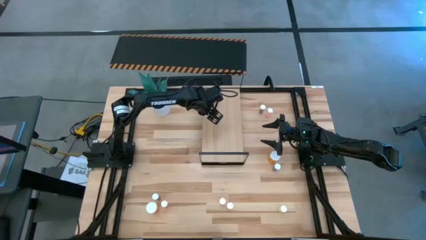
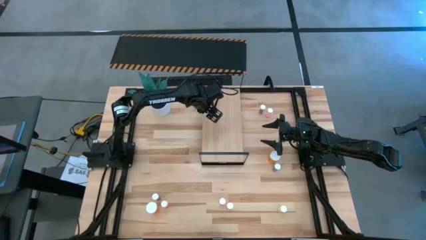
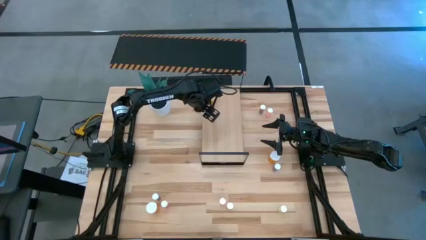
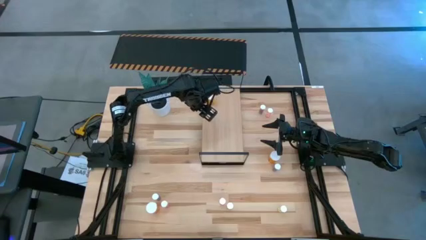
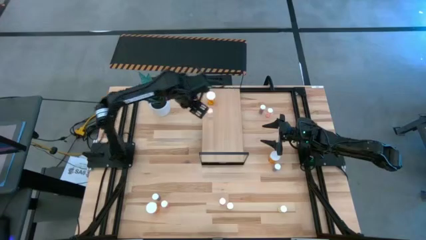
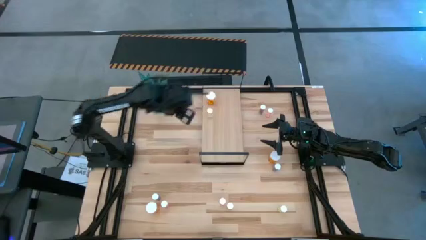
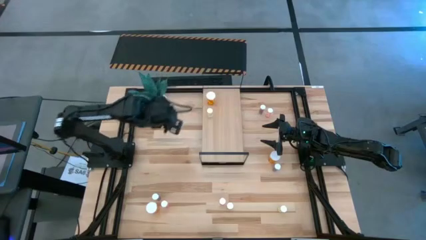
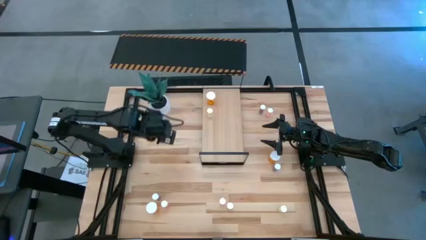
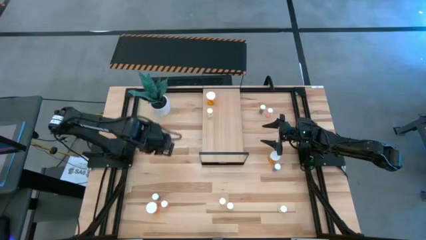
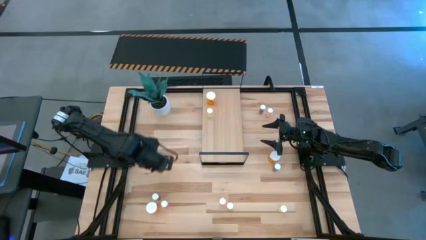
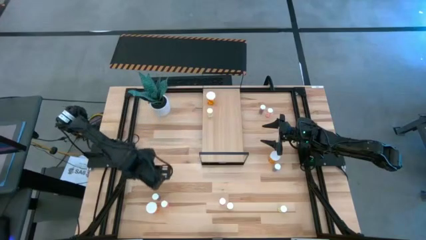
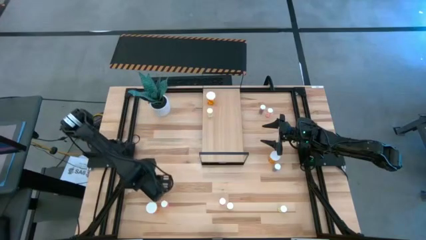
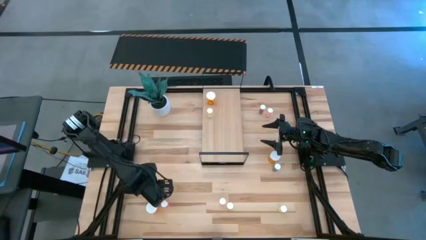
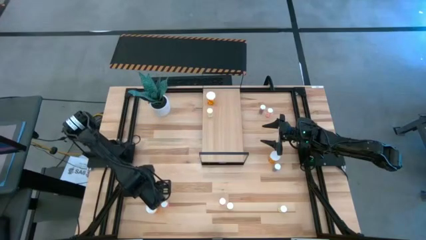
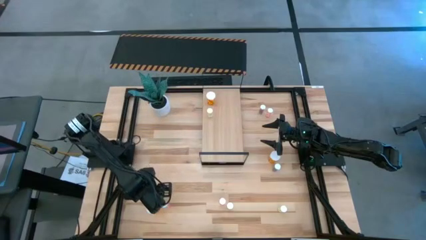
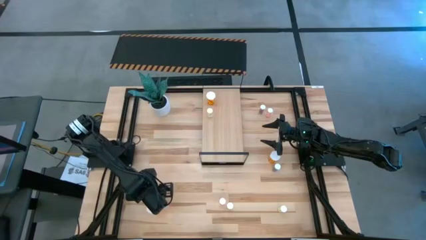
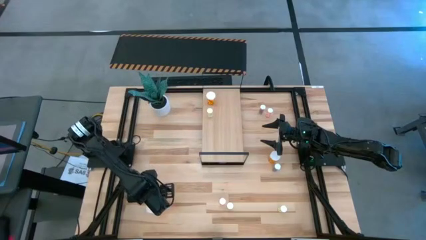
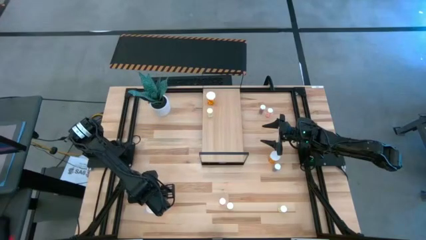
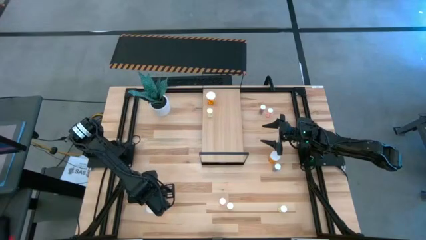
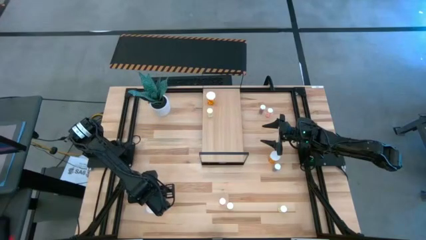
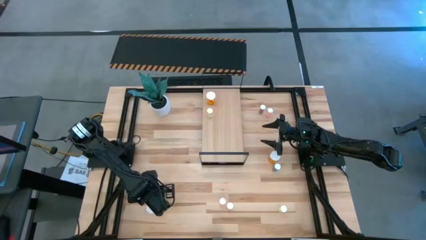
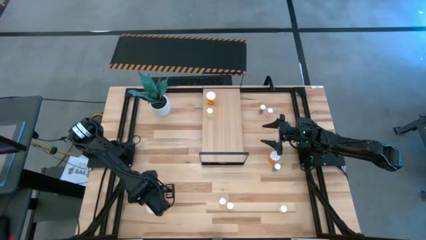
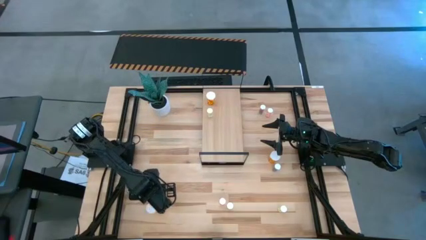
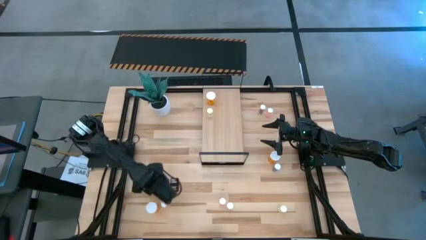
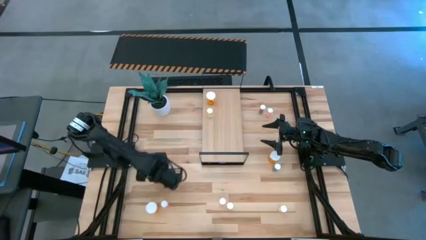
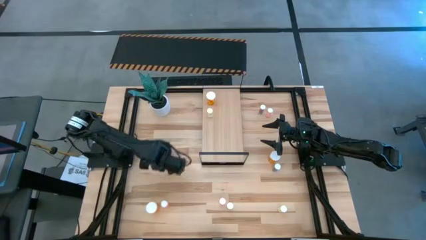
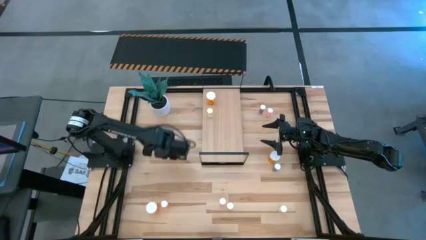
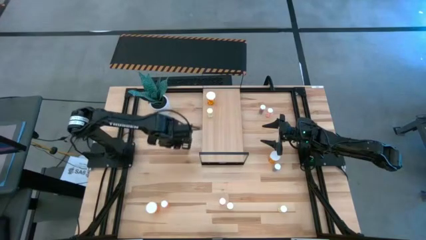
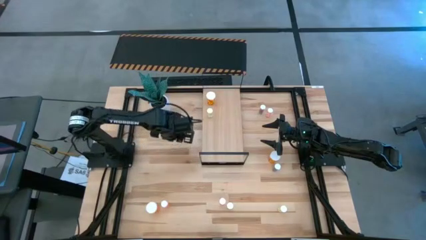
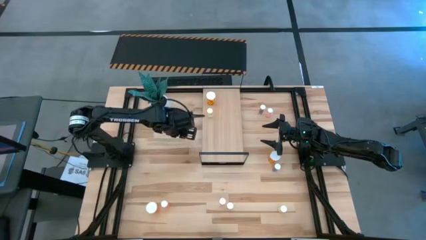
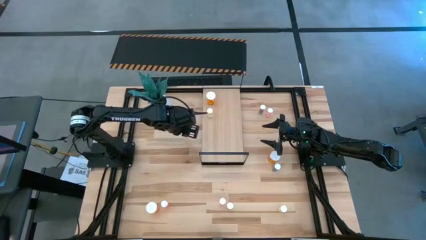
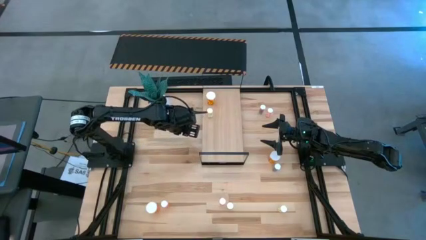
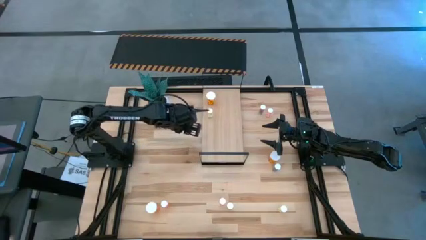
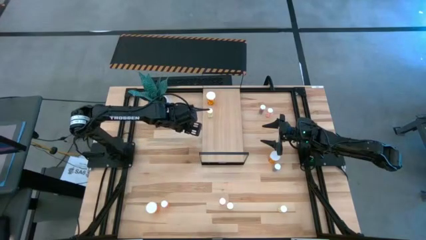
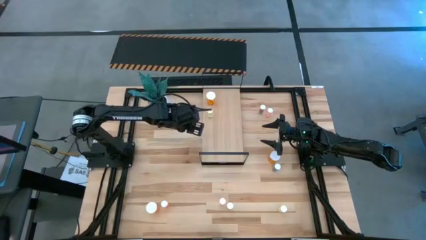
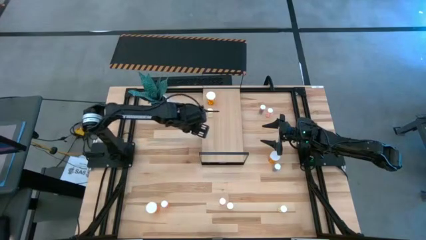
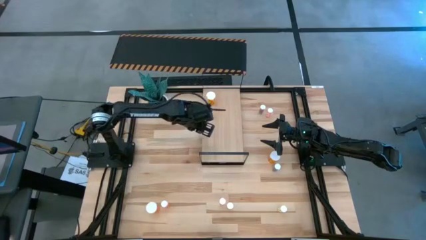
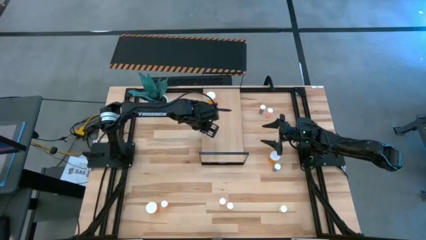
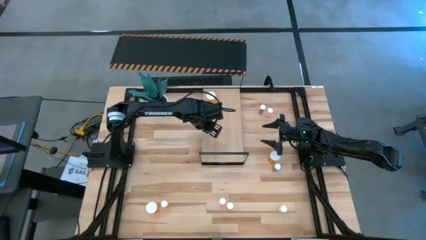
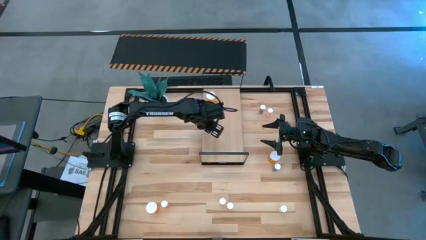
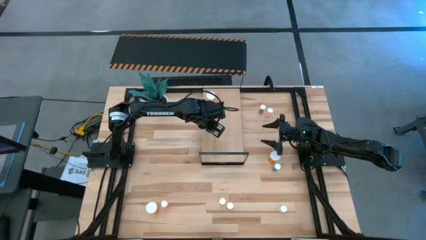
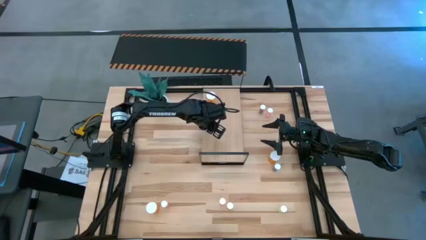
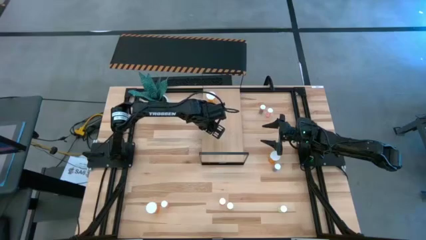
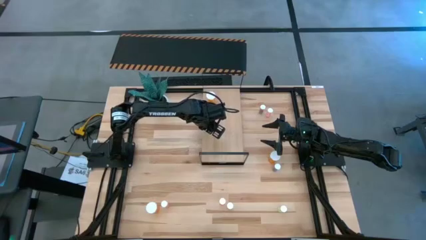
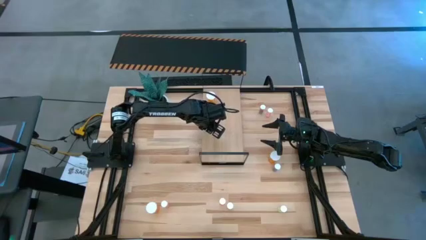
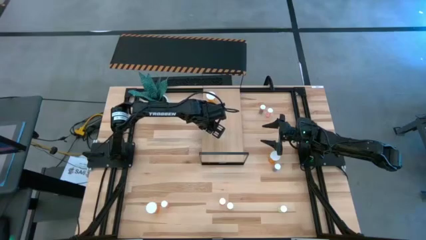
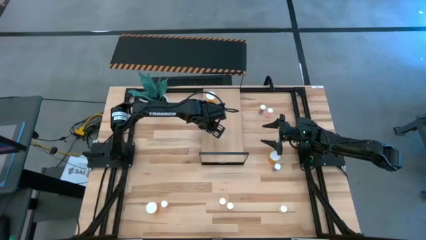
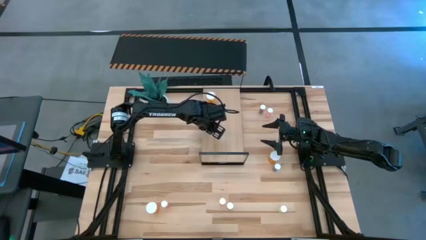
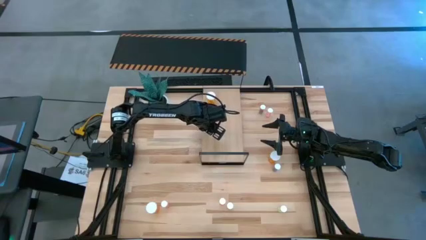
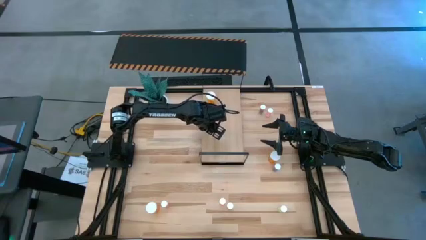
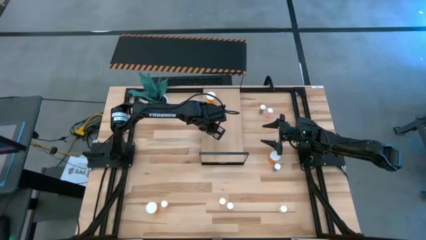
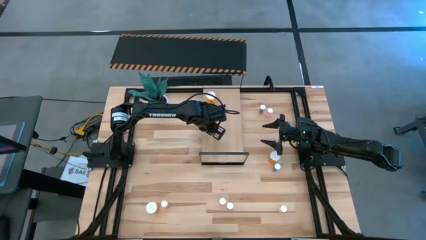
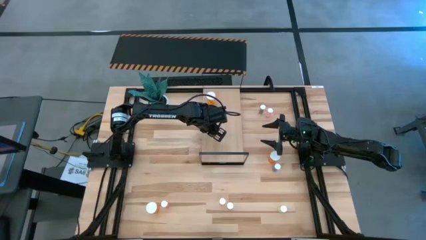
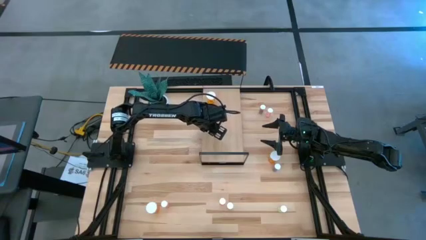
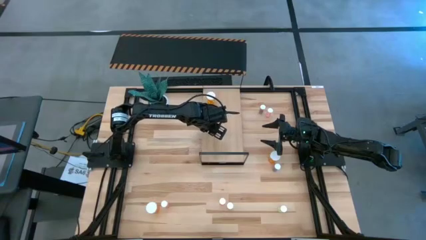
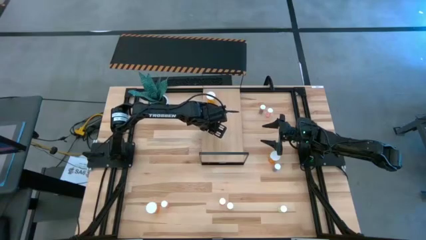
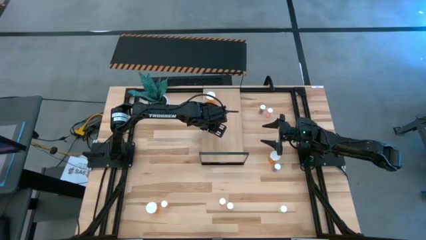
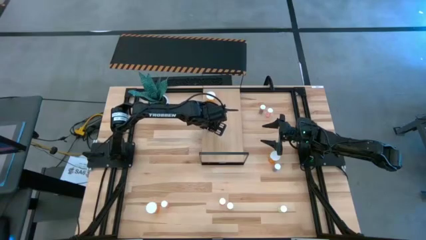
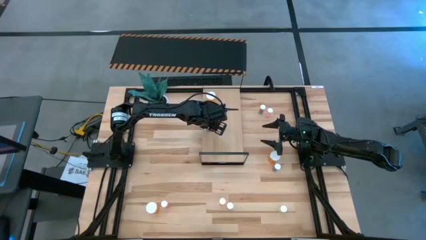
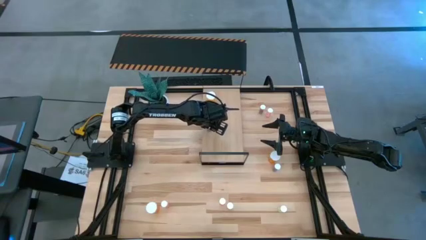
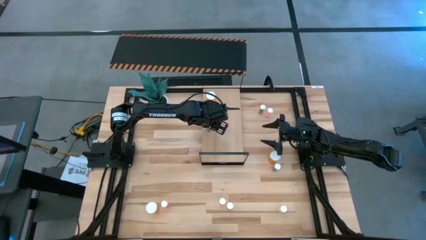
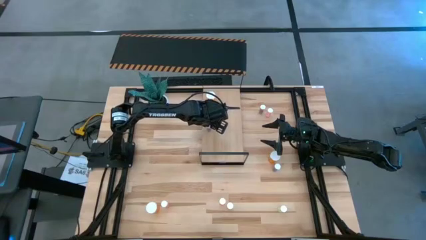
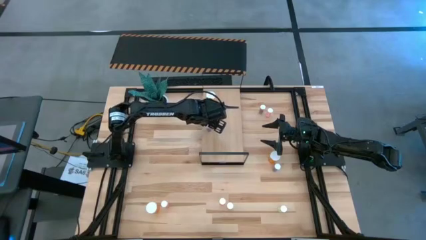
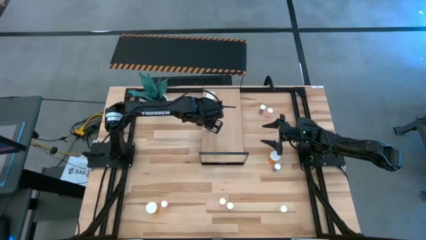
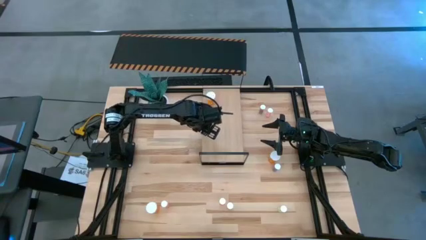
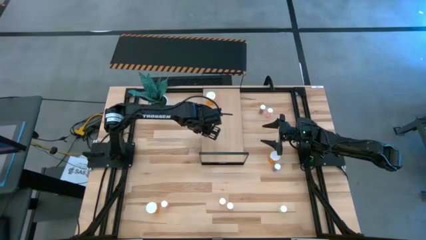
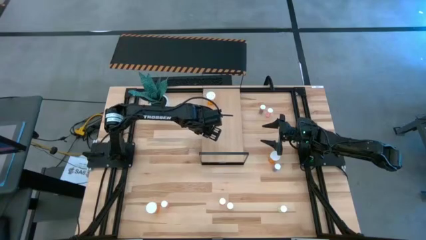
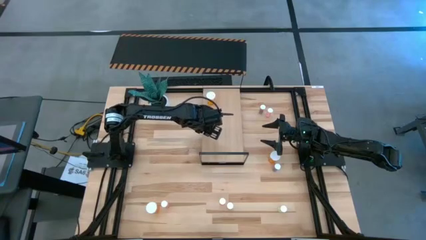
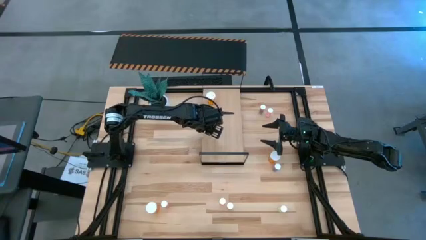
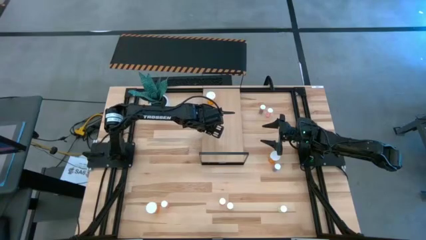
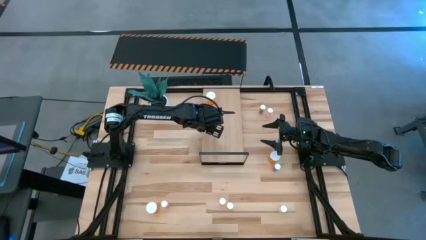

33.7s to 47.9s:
Task: Pick and place medicine bottles onto shelf by color
Put the bottom small blue pill bottle on the shelf

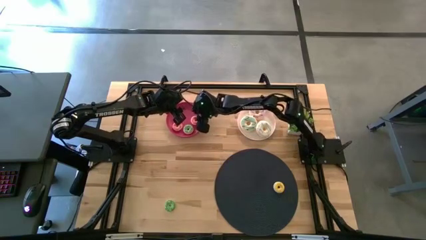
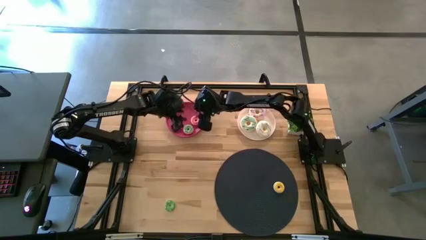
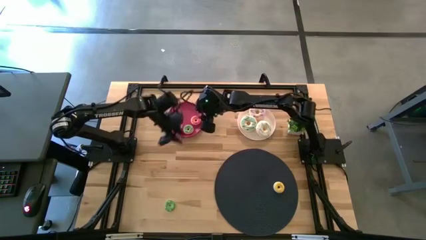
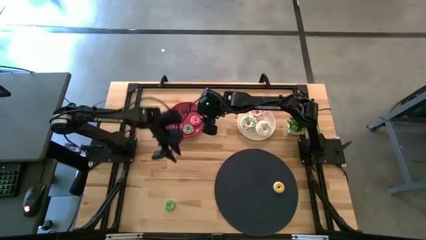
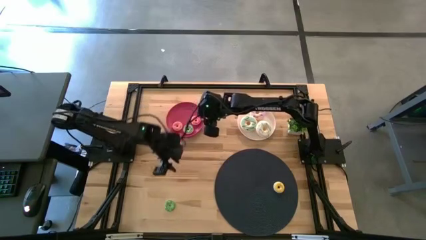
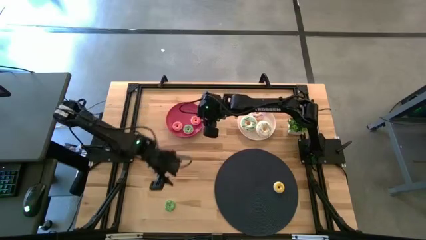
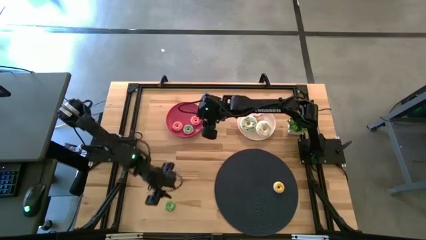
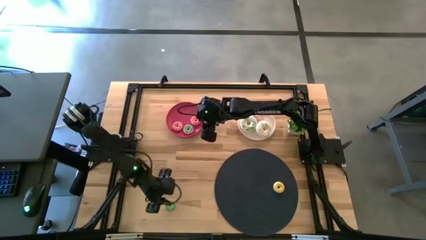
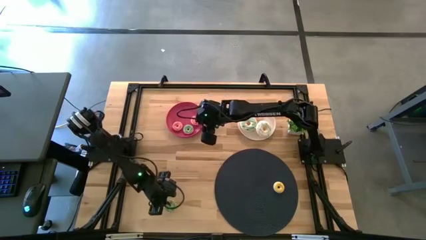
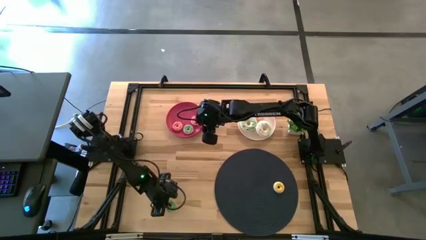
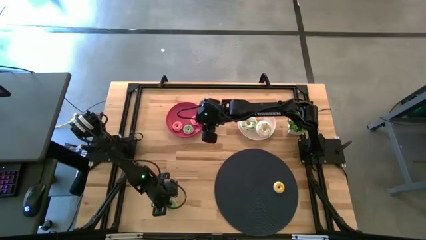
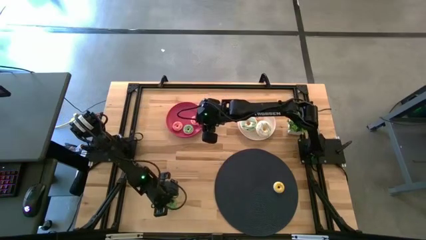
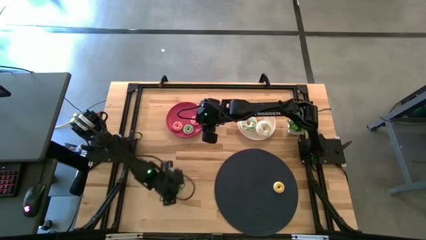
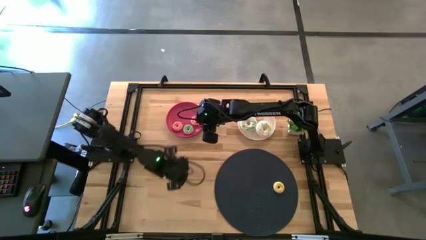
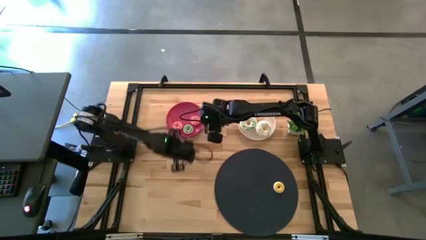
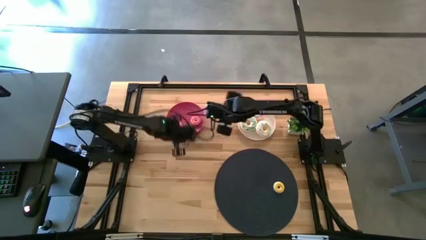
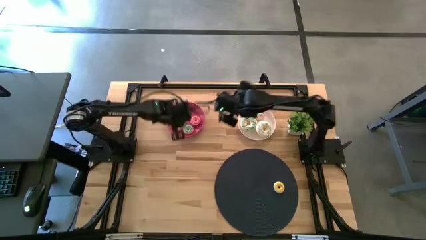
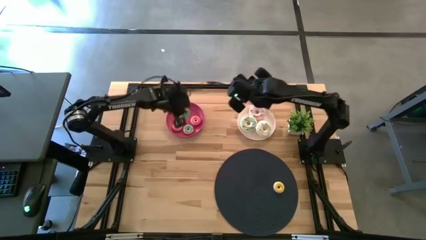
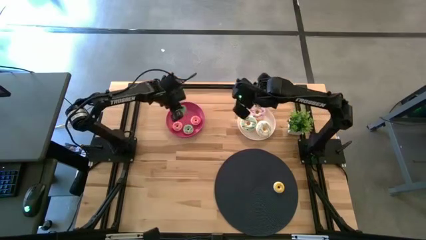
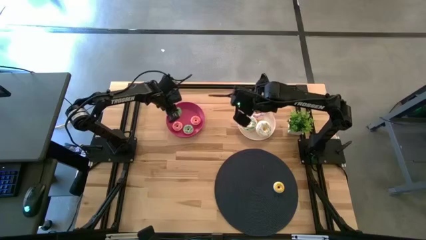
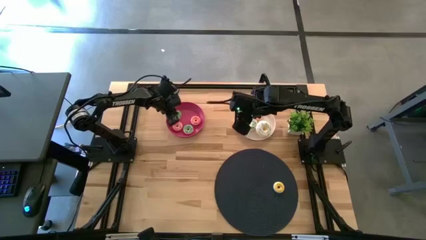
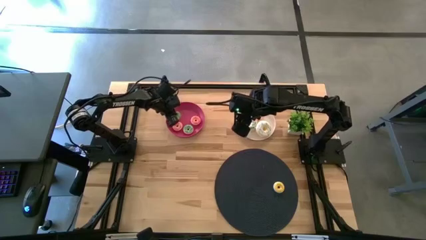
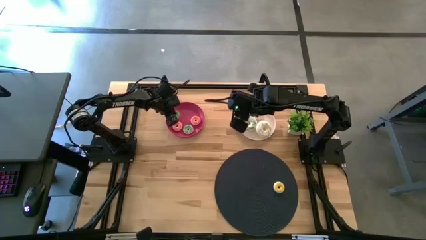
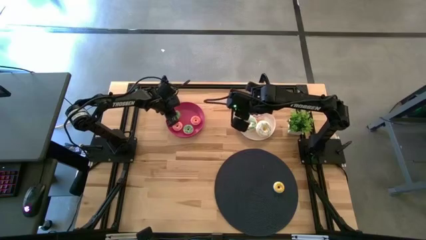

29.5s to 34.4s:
Task: Pick & Place donuts
Put the small green donut on the pink plate
